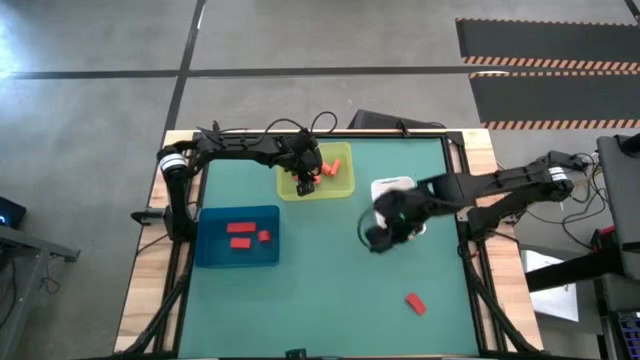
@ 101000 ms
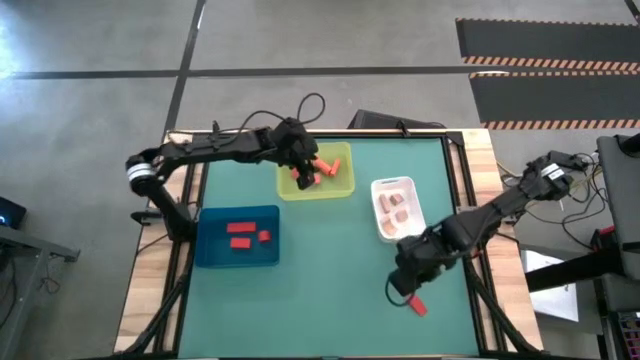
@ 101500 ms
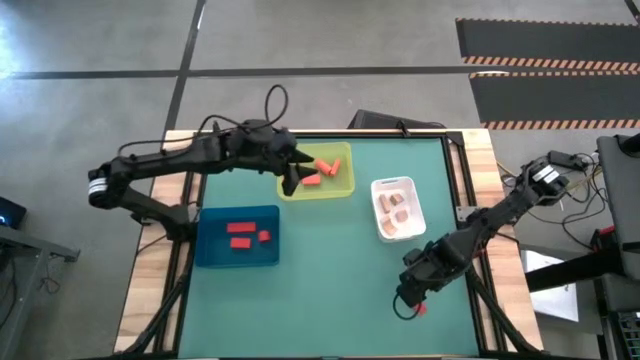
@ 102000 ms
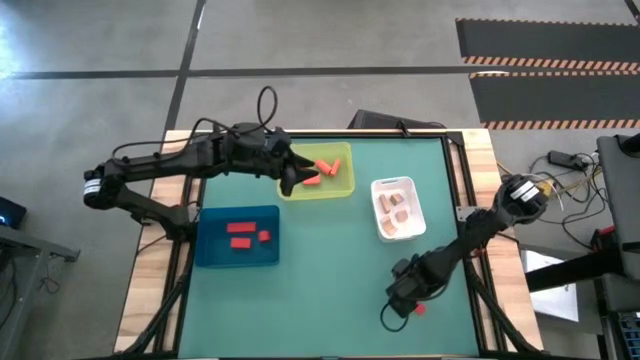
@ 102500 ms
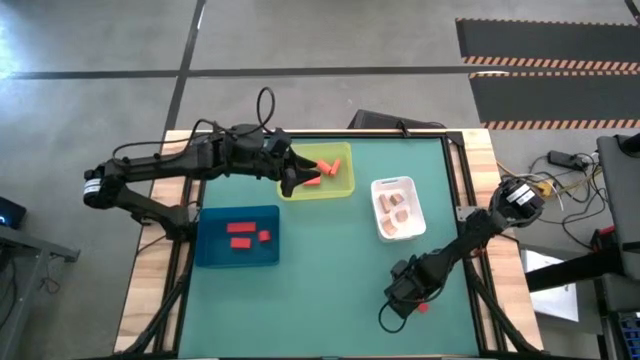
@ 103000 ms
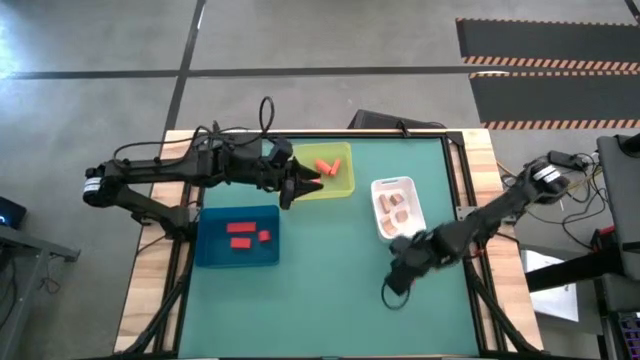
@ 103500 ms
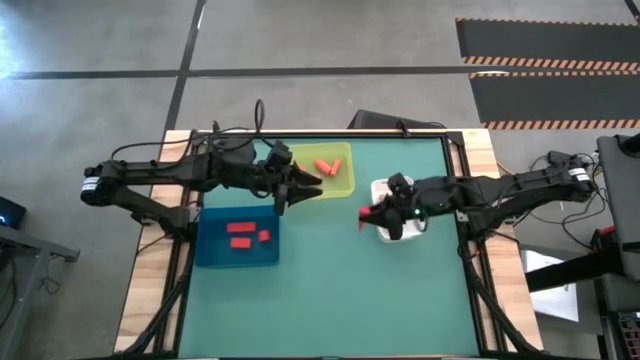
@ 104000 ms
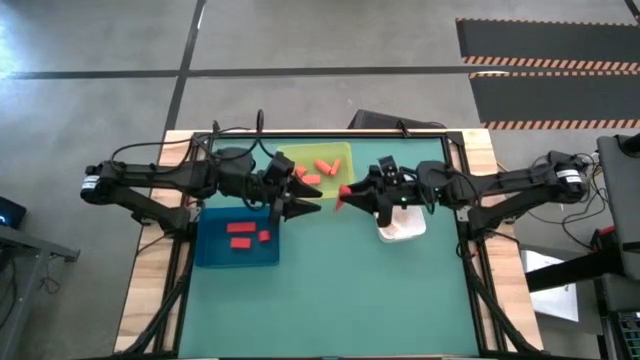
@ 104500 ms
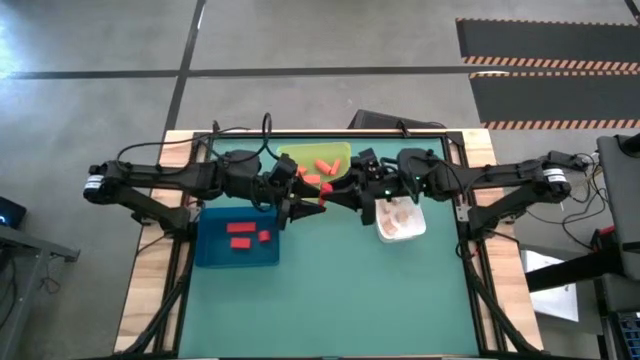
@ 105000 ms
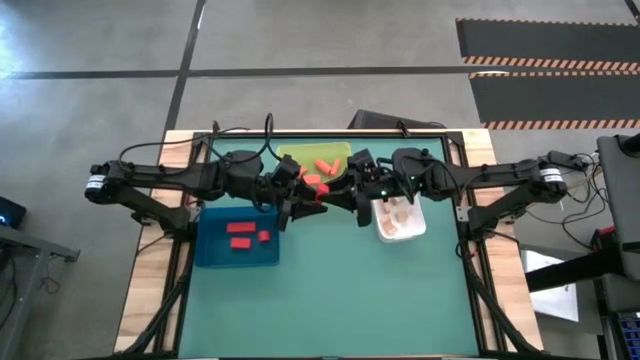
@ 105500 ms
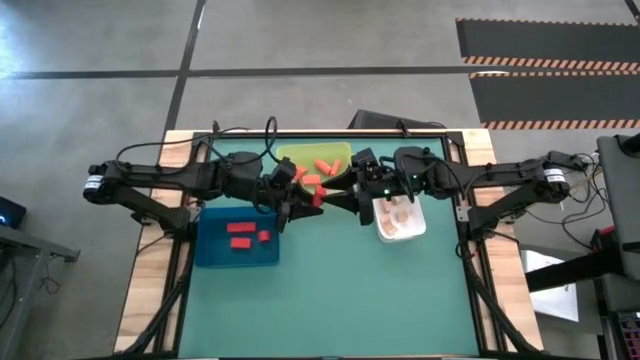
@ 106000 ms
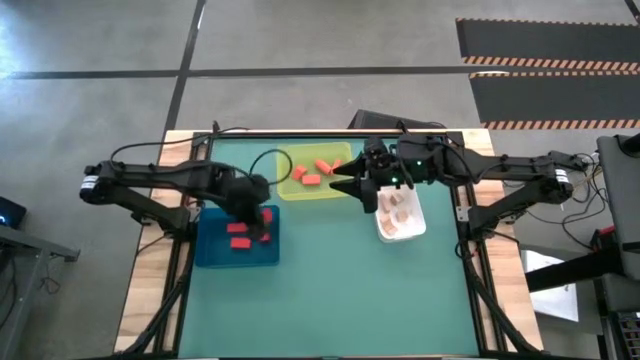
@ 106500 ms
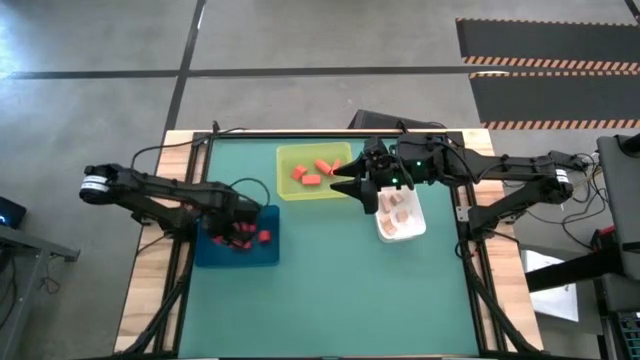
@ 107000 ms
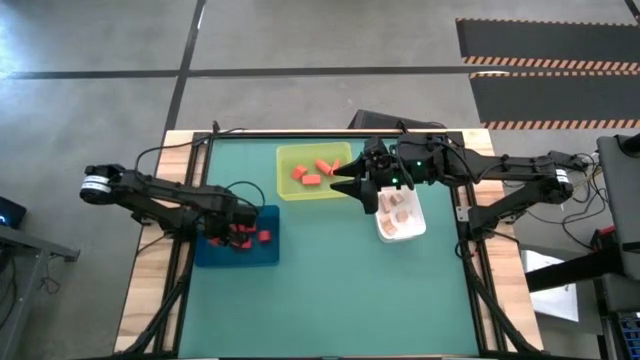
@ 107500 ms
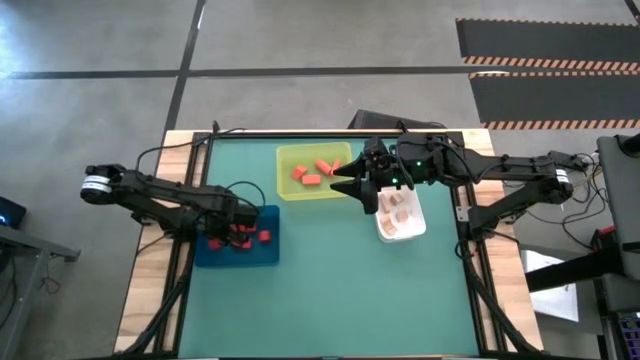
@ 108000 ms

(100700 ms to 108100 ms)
Task: Sort & place blocks by color
Put the red block into the dark blue bin

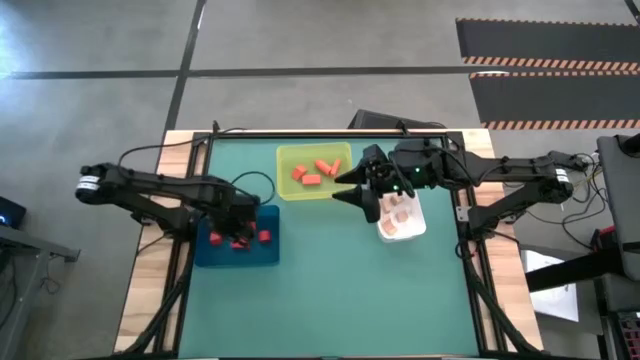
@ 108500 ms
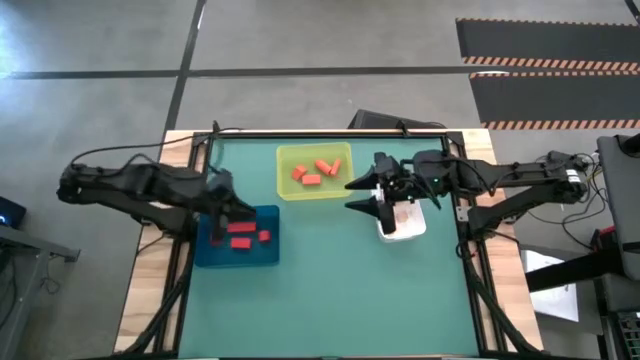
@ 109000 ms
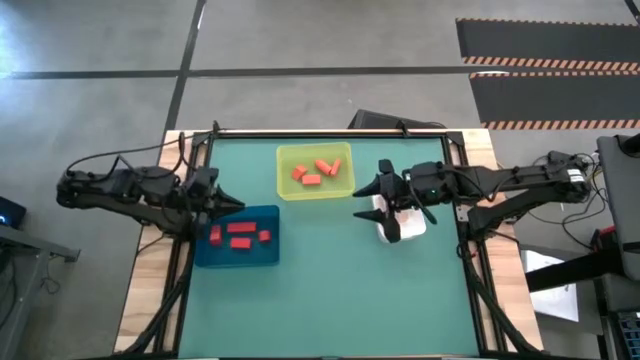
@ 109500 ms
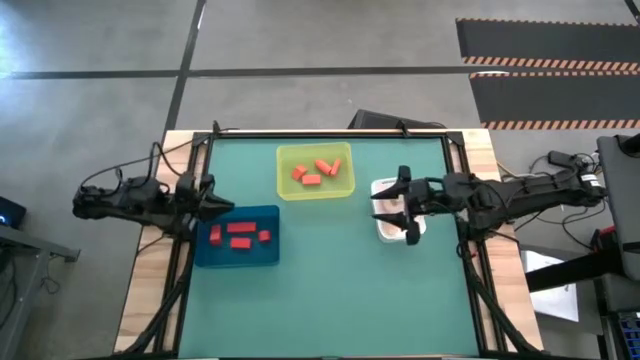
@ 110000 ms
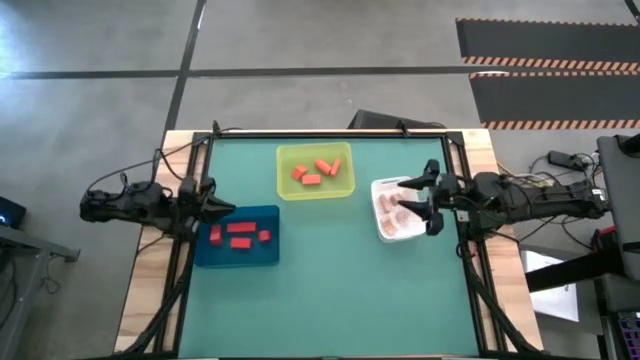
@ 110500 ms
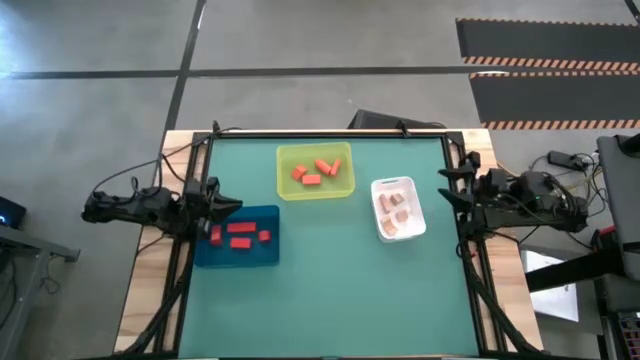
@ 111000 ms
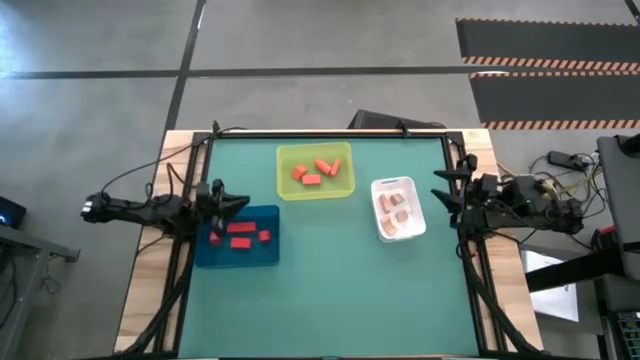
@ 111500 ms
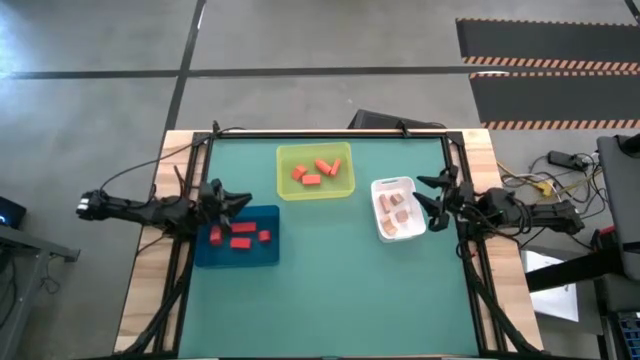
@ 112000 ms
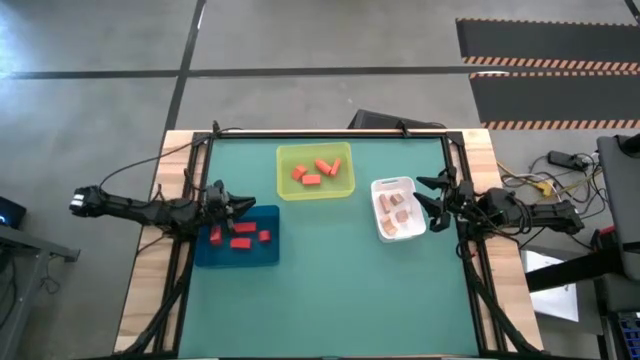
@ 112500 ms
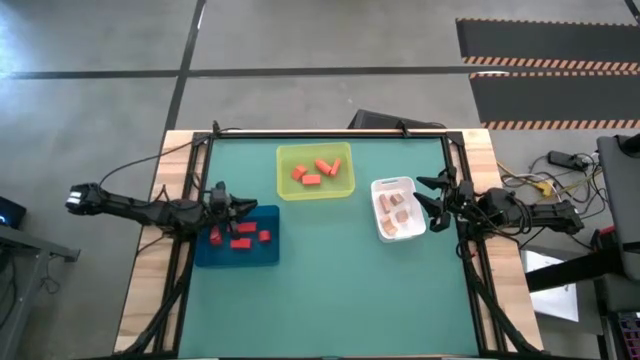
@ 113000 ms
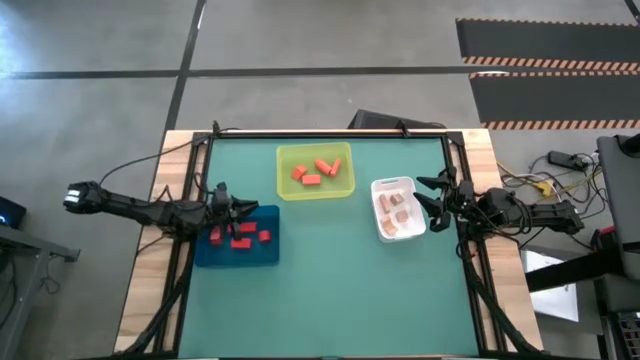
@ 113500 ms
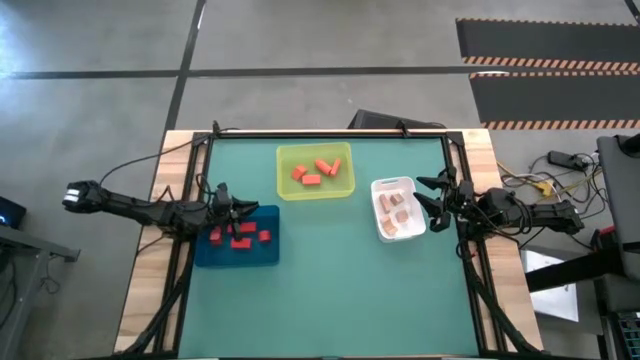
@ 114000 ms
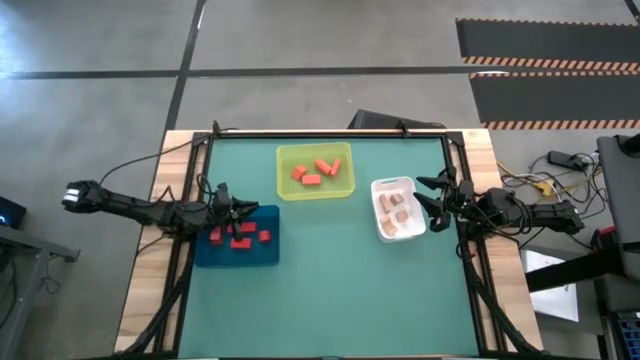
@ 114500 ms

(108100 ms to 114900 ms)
Return to Home Position
